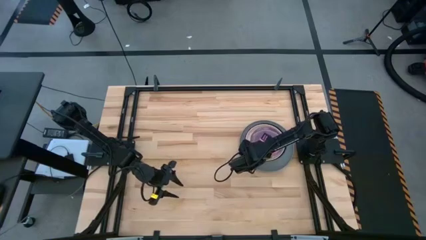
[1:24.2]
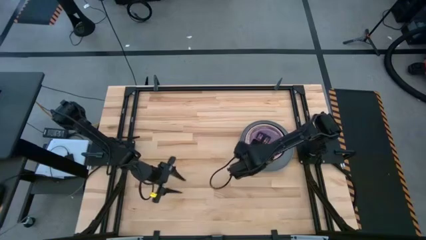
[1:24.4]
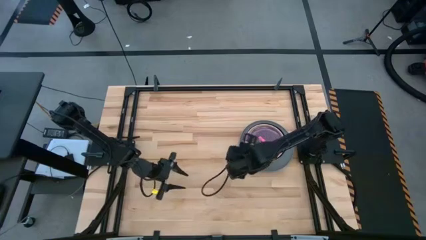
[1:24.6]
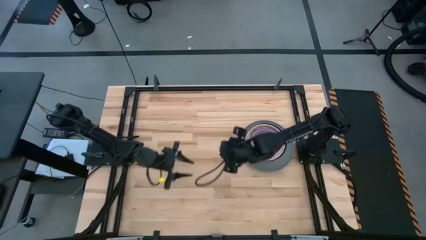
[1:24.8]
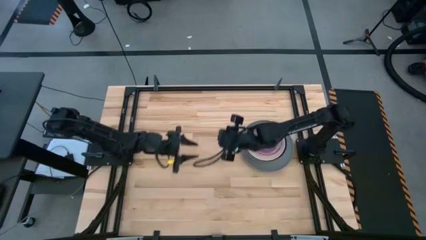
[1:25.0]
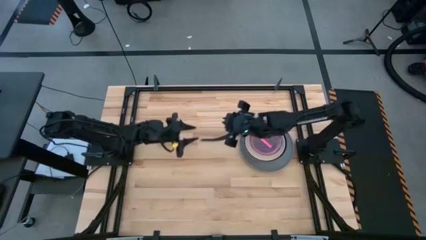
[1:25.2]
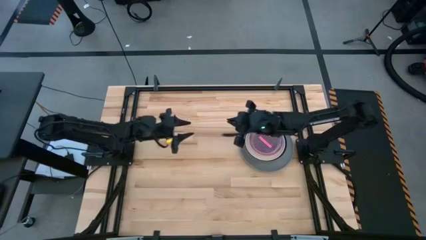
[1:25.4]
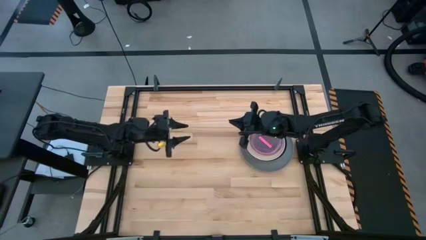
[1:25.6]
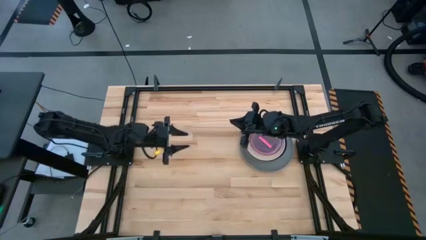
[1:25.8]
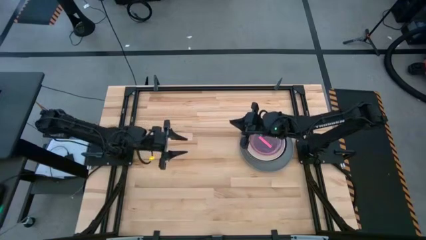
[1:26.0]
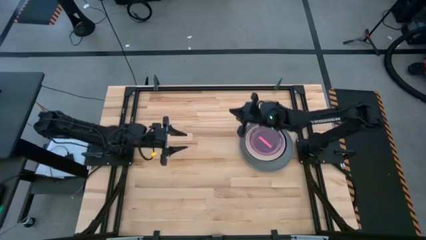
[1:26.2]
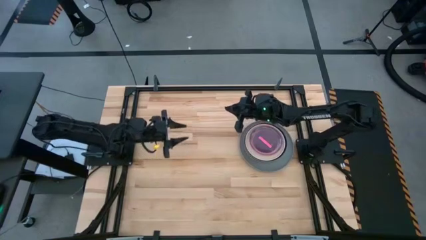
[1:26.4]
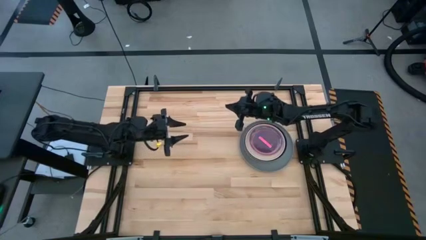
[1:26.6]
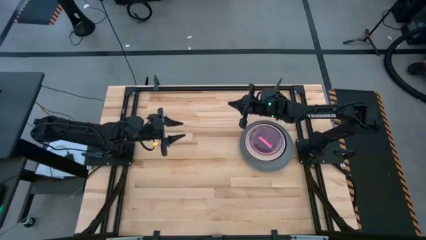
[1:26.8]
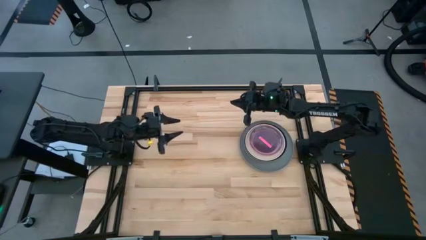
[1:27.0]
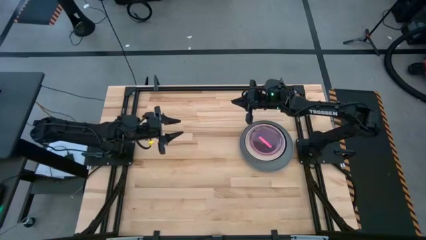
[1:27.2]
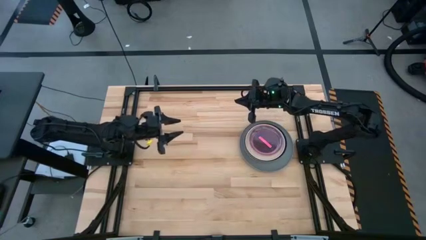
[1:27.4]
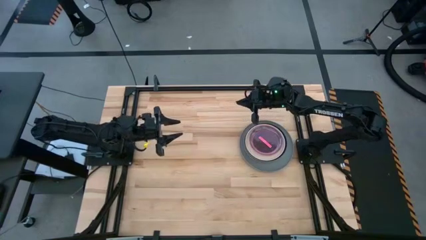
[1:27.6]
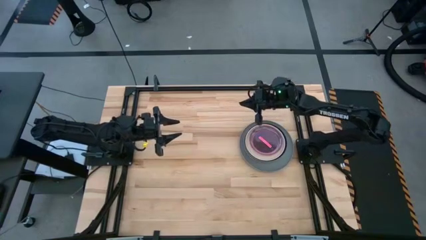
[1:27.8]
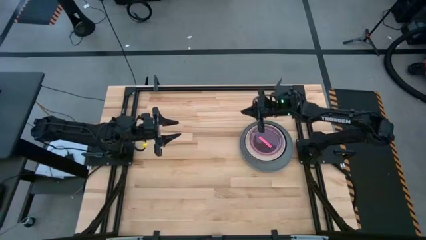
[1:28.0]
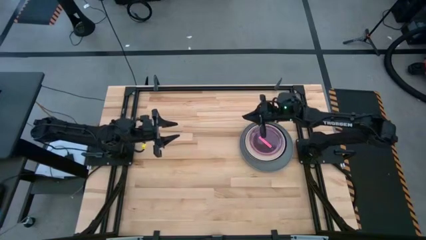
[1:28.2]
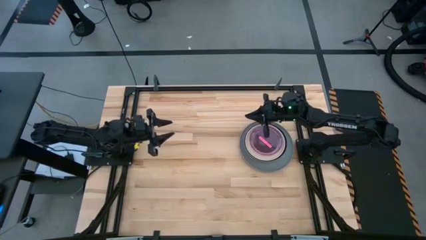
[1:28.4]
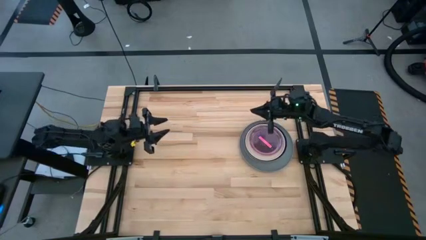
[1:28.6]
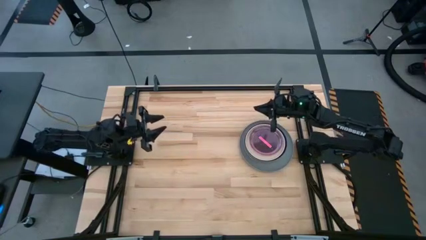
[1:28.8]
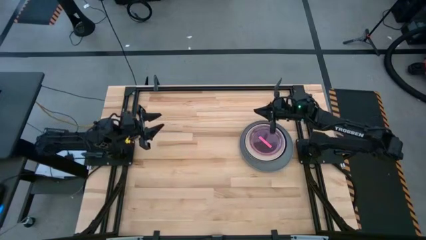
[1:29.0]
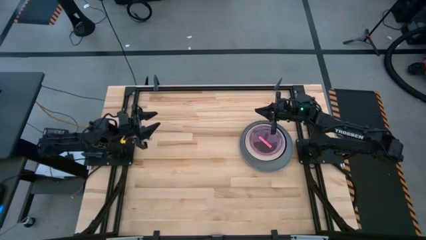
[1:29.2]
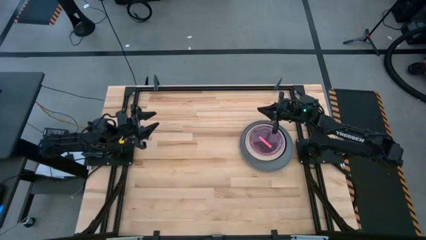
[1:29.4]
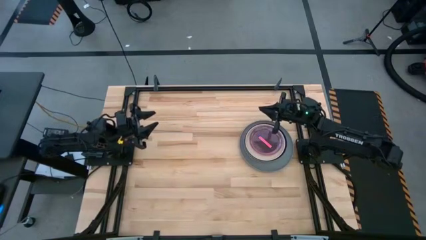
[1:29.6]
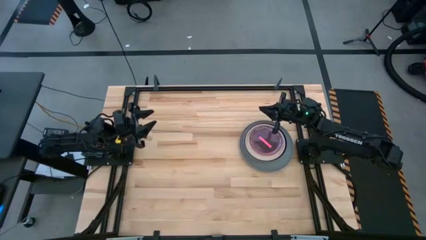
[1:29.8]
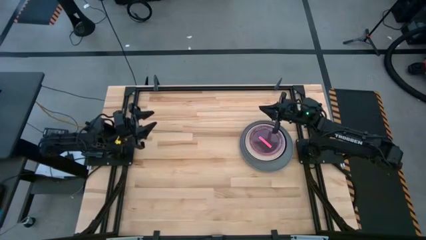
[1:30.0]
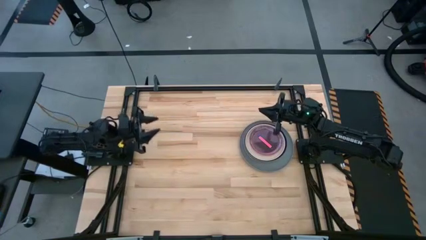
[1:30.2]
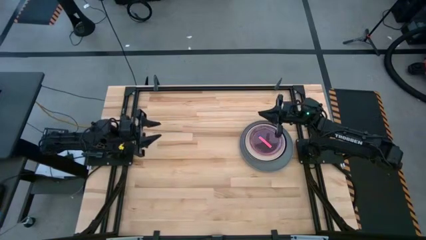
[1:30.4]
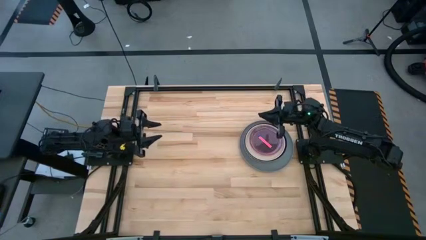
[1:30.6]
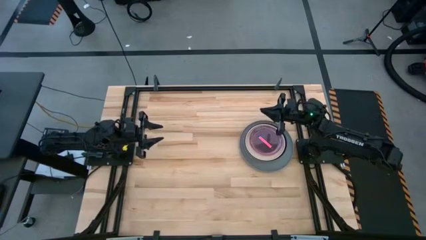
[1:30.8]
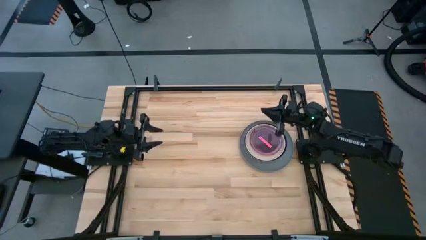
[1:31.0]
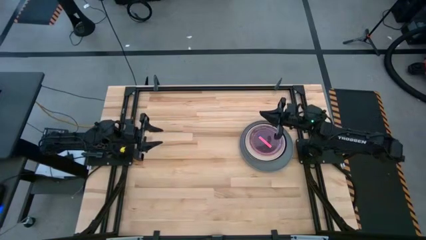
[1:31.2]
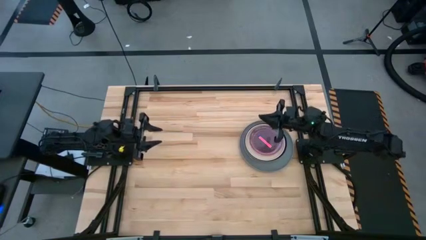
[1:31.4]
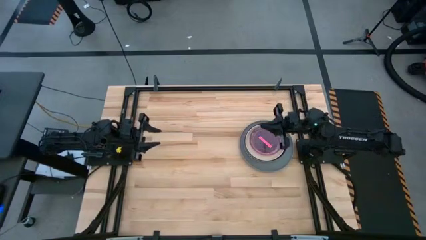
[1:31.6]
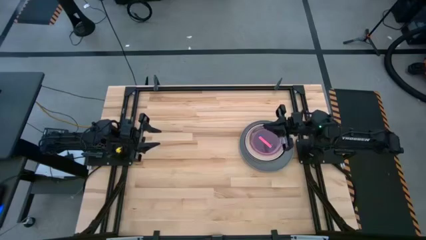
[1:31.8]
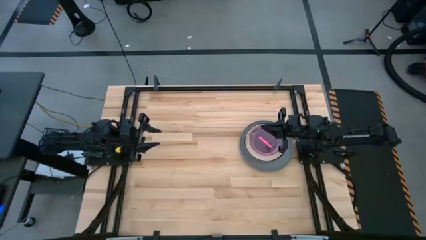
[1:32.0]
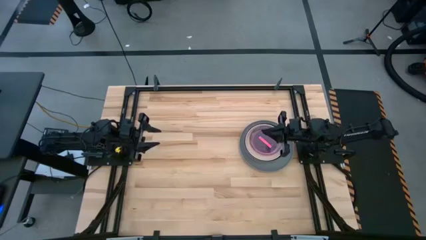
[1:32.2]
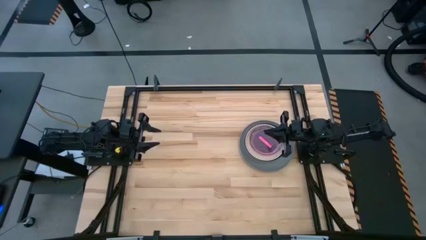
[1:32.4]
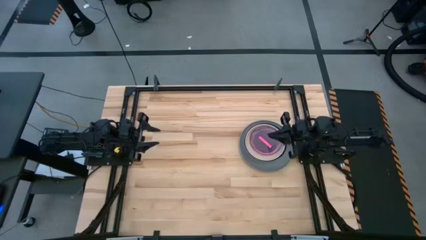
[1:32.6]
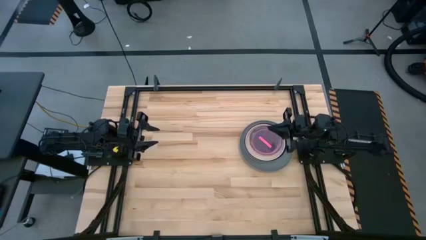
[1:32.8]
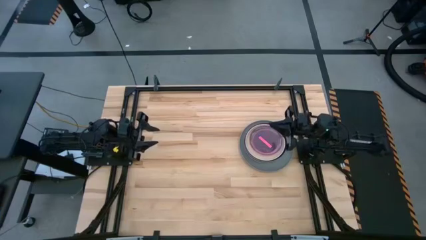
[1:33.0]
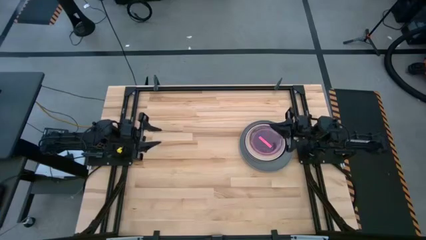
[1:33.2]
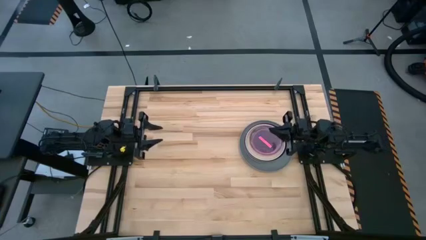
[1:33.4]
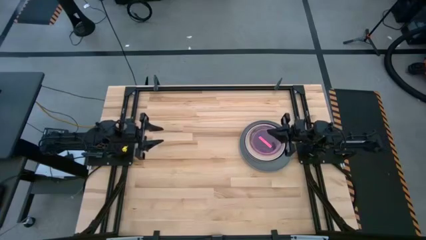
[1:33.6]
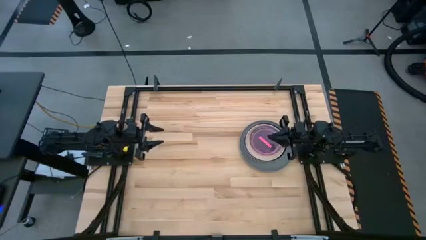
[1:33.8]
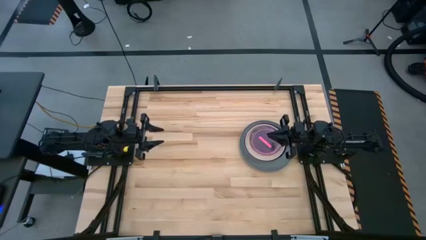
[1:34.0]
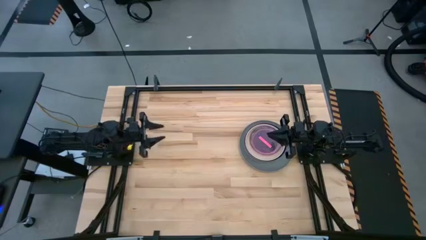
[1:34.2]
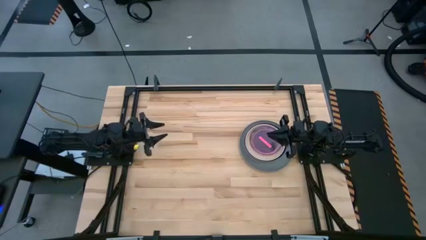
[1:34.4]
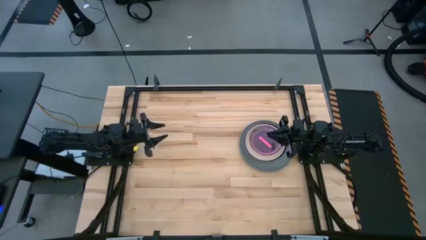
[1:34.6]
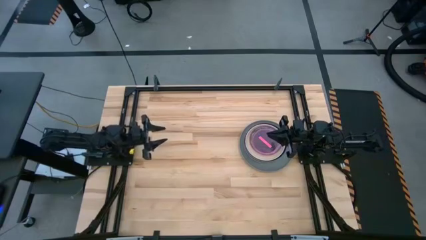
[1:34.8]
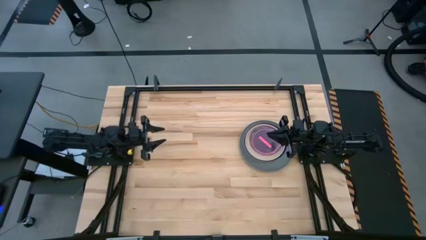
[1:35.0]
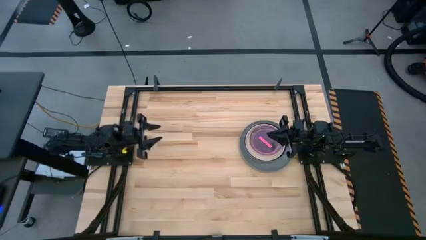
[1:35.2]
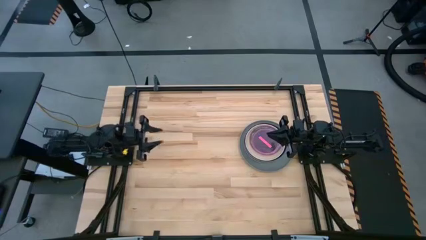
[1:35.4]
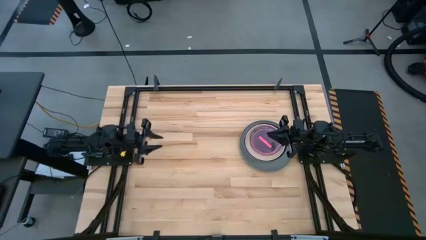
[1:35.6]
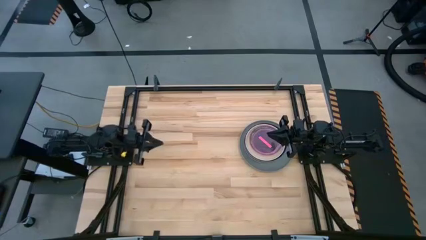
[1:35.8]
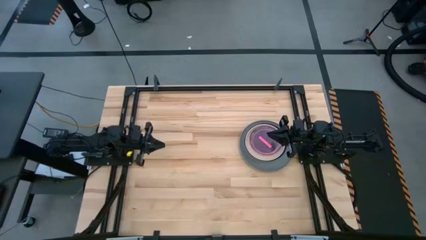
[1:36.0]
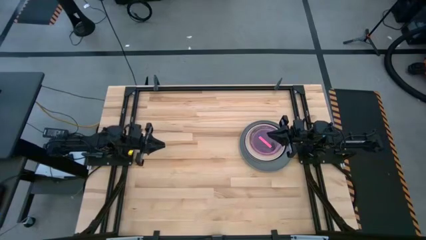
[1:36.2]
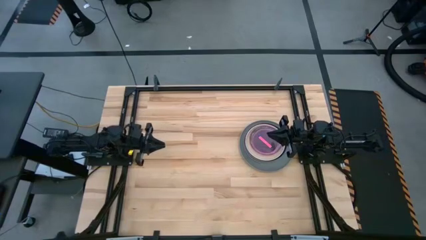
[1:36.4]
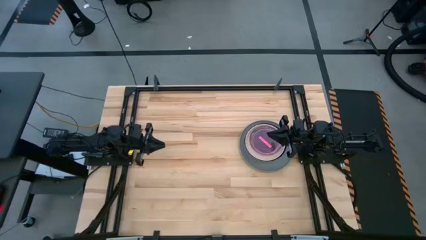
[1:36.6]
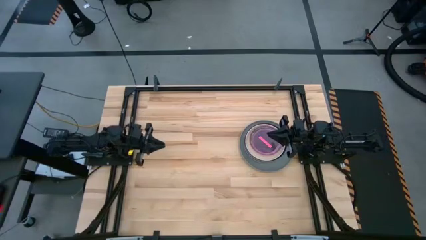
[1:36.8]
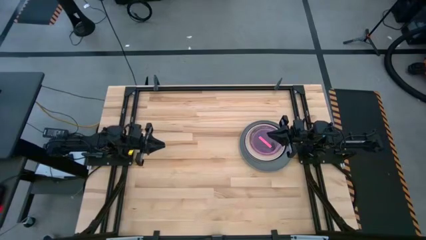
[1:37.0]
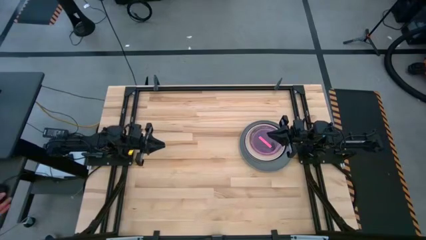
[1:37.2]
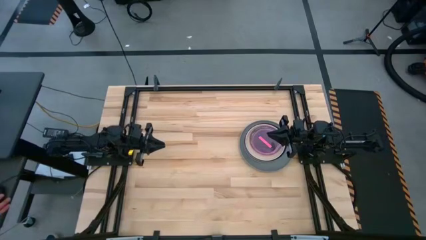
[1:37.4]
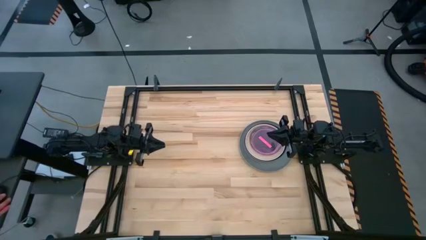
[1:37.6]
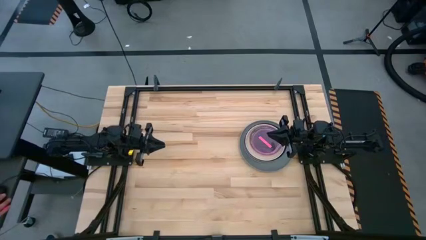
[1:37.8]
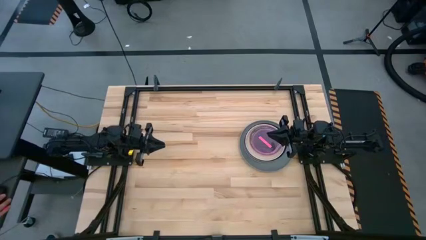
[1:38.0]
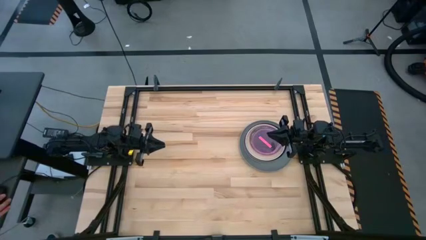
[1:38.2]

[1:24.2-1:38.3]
Task: Stack plastic plates
Return to Home Position

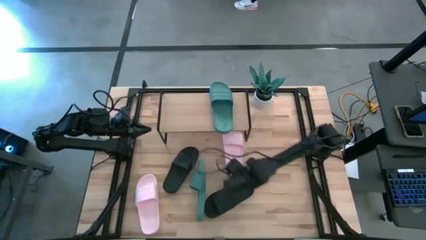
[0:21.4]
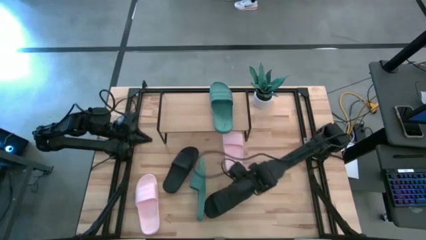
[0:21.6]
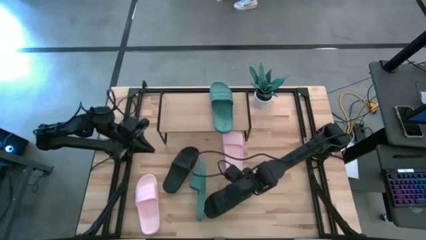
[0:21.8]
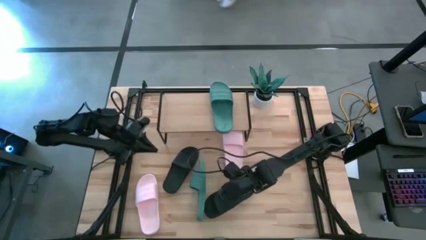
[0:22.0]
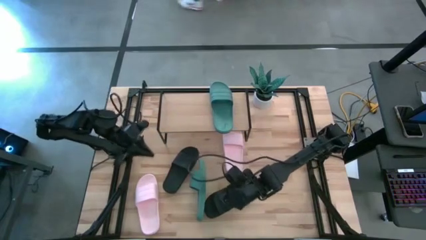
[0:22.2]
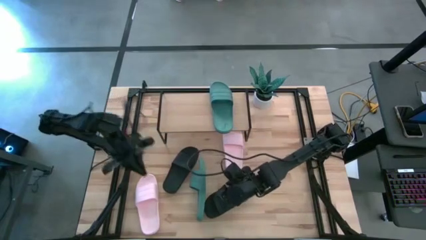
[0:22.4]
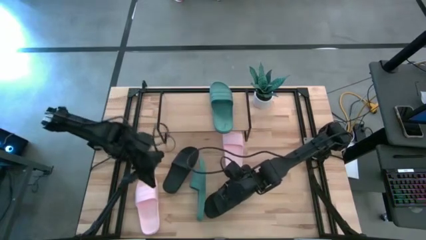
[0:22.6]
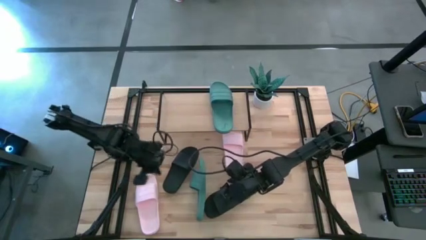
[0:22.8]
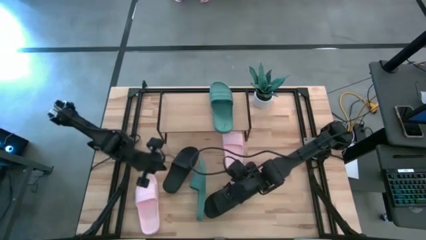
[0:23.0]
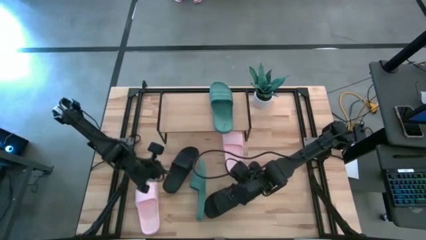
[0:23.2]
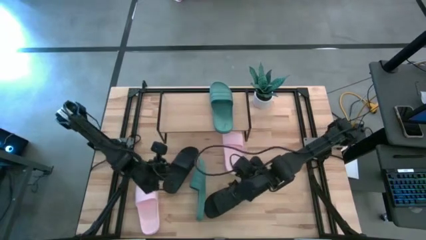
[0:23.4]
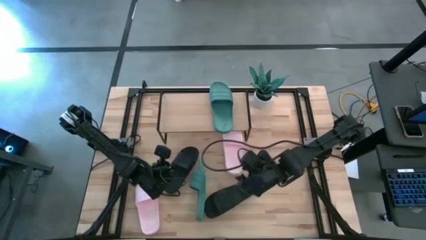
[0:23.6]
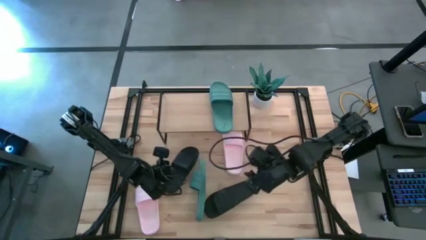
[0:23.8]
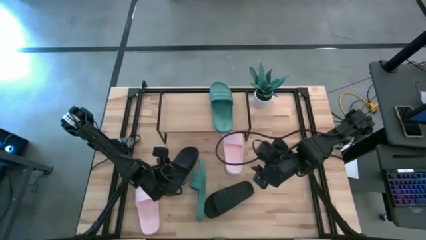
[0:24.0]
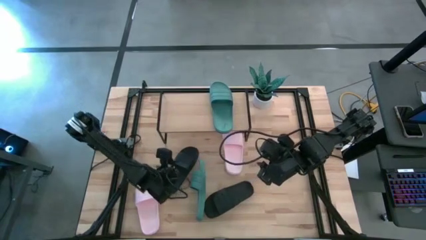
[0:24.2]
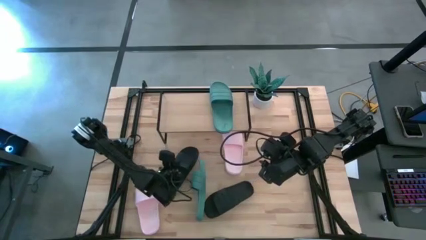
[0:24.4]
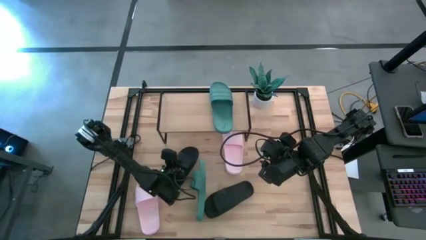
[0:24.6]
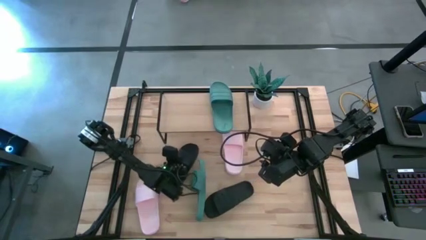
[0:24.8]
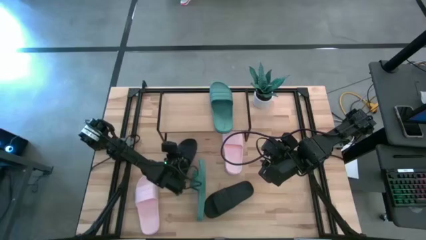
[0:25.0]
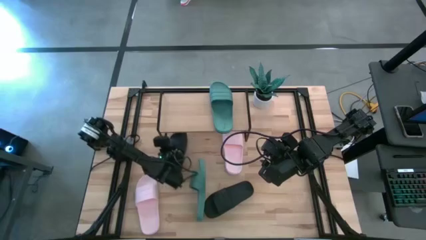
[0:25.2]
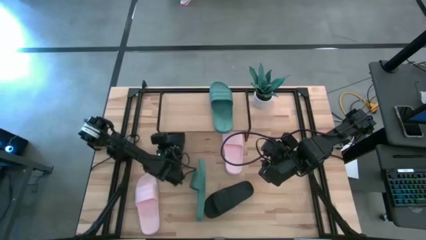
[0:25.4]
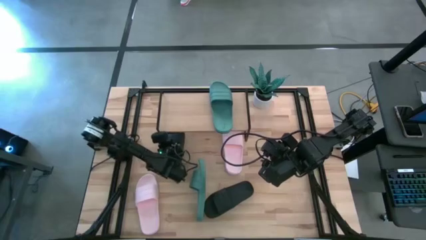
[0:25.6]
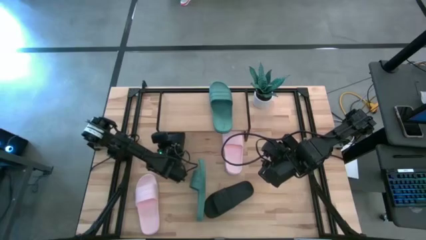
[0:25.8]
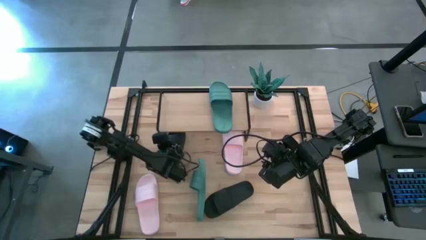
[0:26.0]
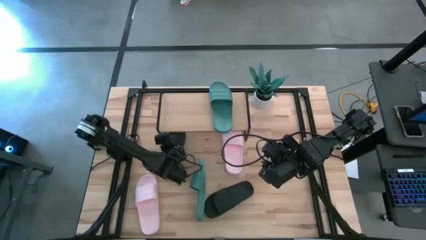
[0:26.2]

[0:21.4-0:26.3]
Task: Pick and place slides into the shelf
Move the top black slide under the shelf
